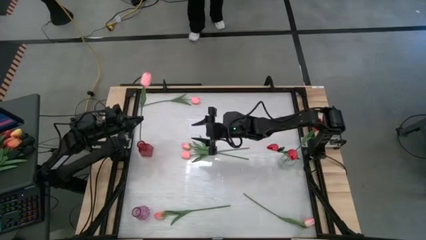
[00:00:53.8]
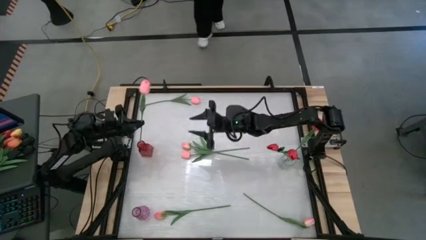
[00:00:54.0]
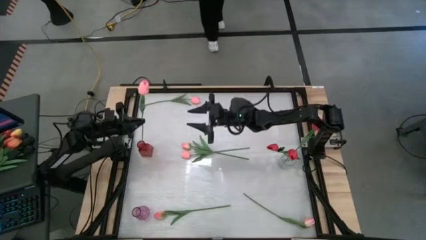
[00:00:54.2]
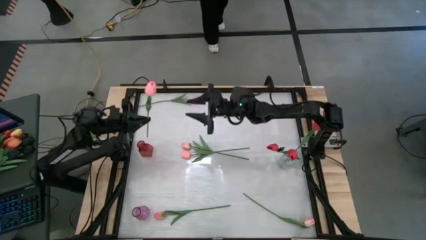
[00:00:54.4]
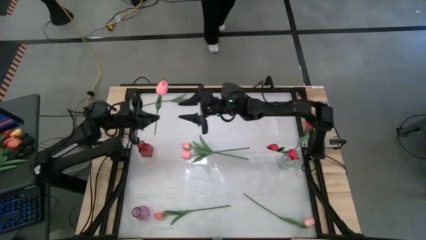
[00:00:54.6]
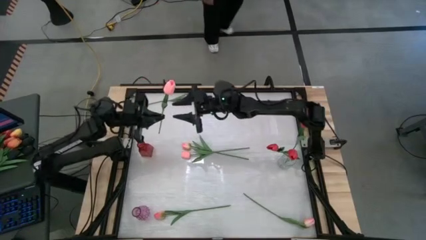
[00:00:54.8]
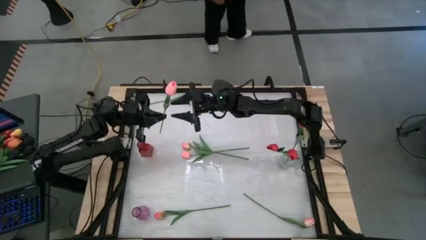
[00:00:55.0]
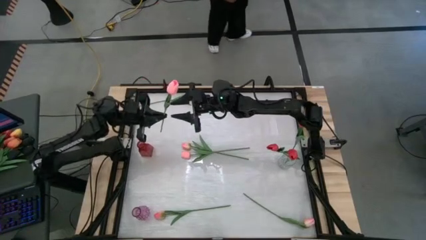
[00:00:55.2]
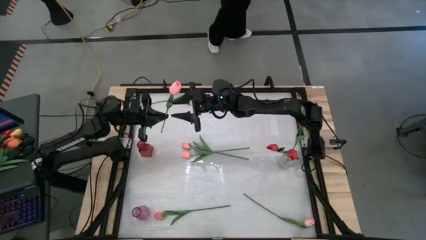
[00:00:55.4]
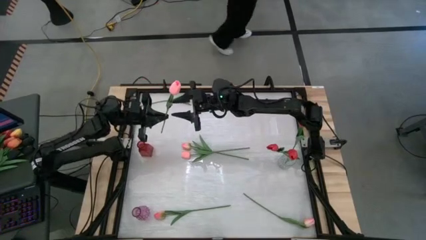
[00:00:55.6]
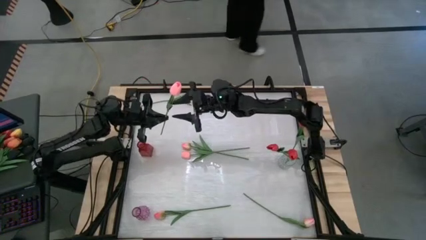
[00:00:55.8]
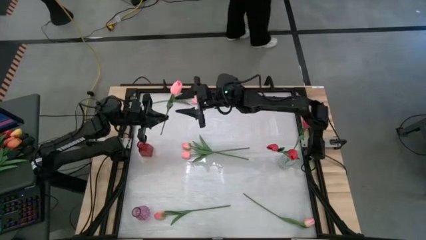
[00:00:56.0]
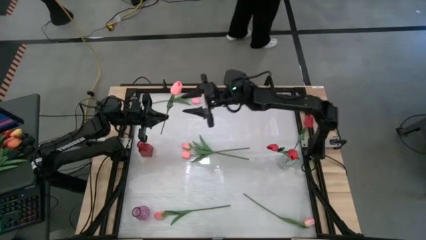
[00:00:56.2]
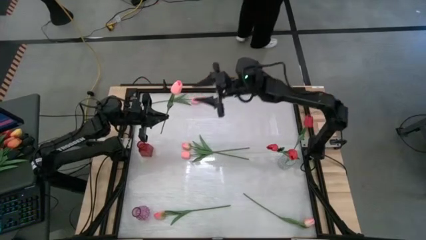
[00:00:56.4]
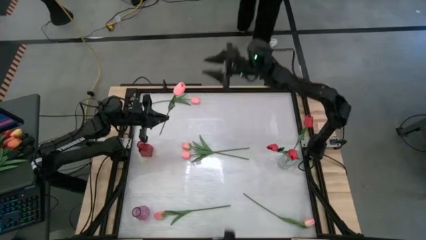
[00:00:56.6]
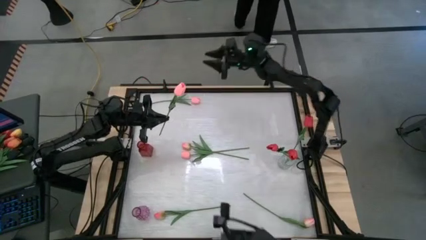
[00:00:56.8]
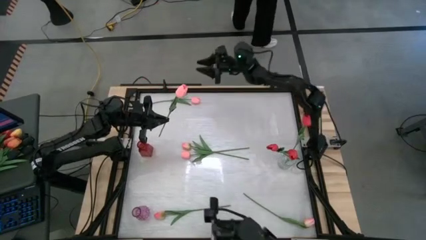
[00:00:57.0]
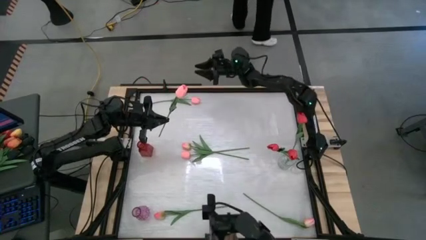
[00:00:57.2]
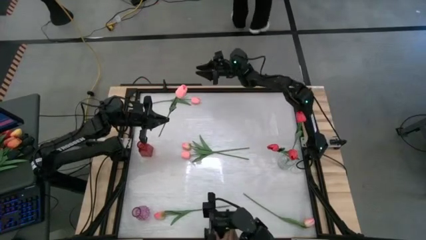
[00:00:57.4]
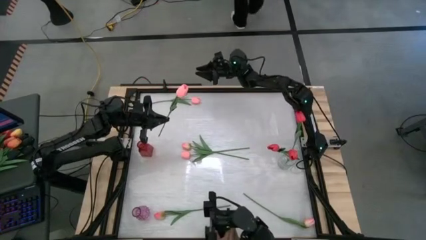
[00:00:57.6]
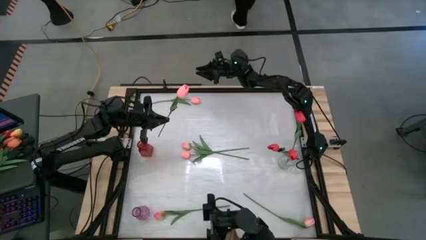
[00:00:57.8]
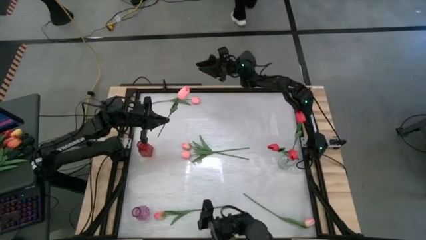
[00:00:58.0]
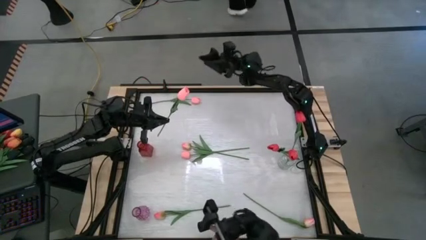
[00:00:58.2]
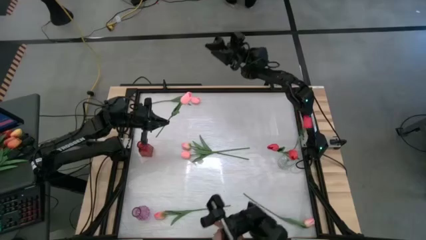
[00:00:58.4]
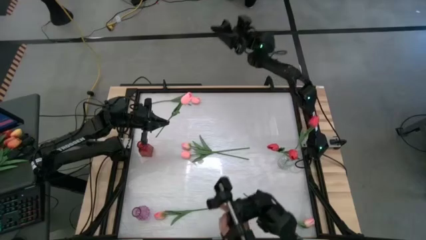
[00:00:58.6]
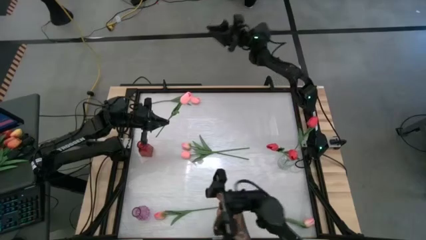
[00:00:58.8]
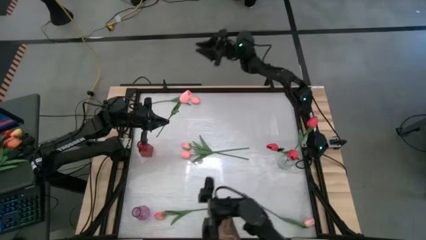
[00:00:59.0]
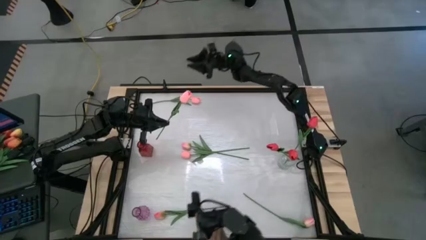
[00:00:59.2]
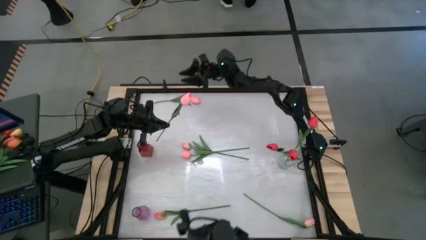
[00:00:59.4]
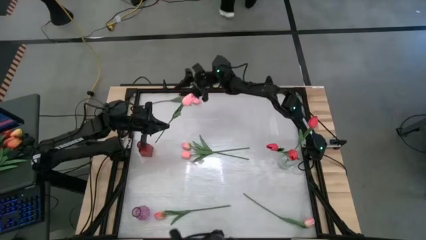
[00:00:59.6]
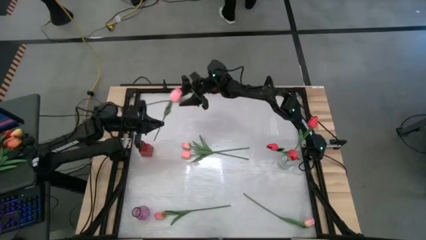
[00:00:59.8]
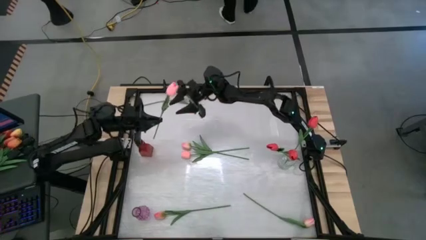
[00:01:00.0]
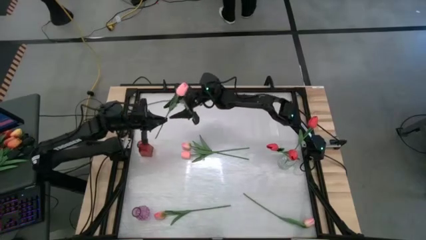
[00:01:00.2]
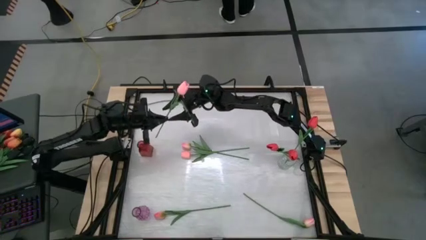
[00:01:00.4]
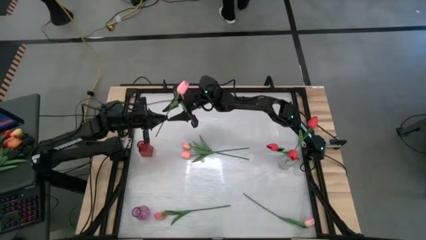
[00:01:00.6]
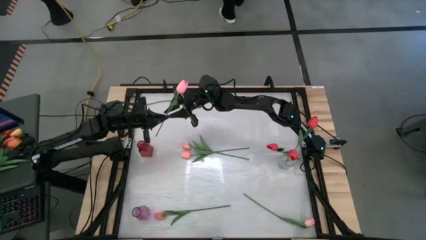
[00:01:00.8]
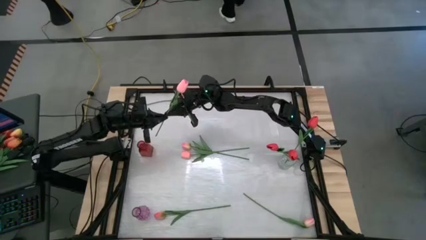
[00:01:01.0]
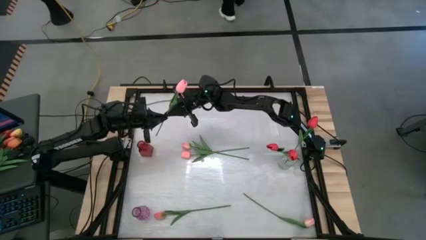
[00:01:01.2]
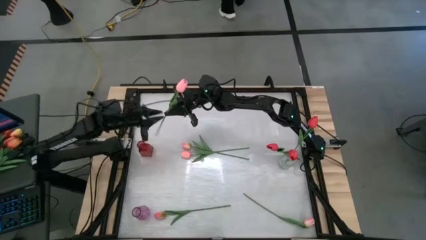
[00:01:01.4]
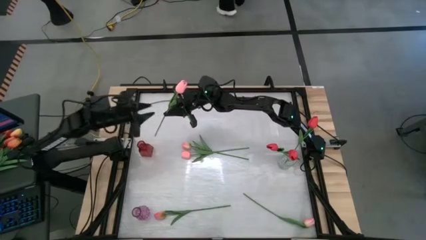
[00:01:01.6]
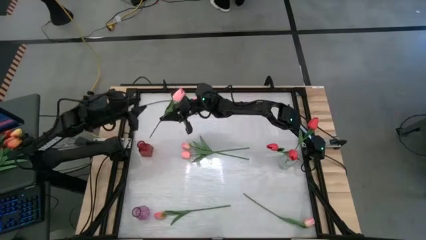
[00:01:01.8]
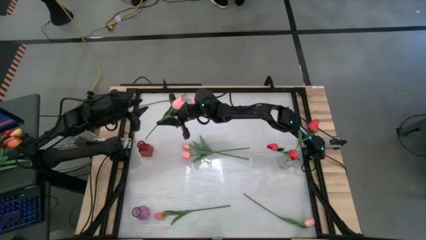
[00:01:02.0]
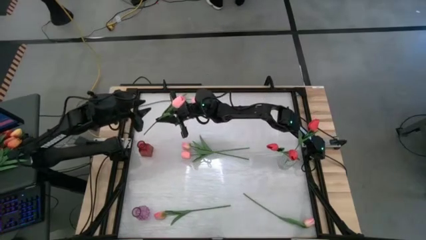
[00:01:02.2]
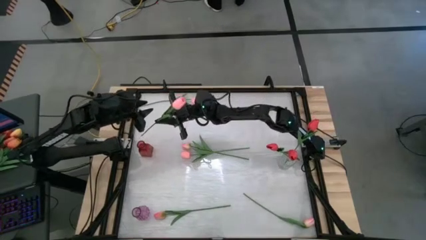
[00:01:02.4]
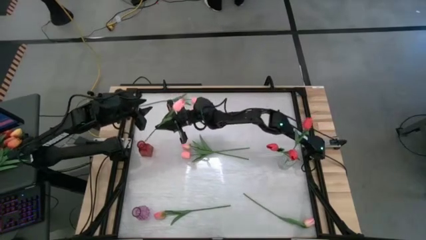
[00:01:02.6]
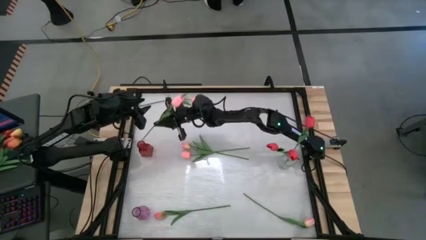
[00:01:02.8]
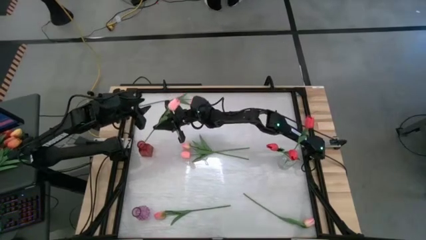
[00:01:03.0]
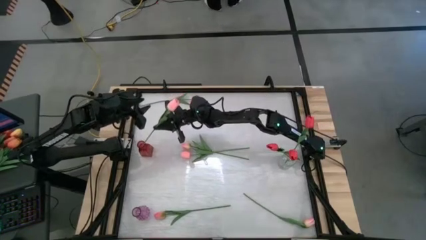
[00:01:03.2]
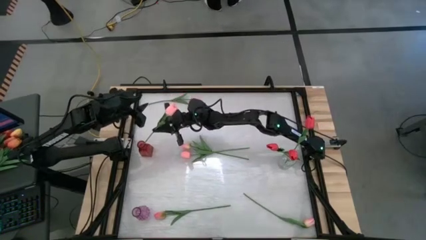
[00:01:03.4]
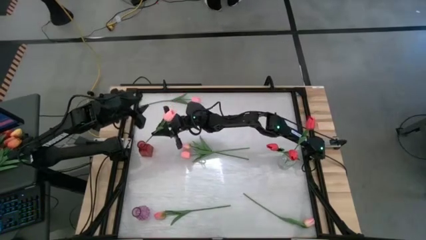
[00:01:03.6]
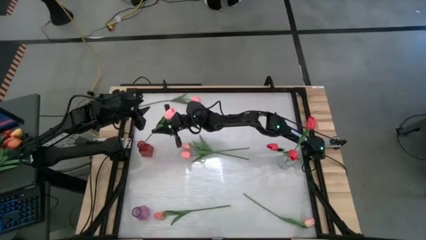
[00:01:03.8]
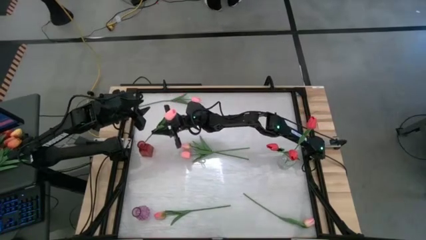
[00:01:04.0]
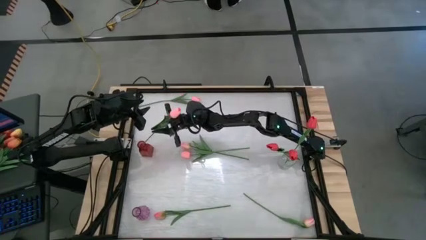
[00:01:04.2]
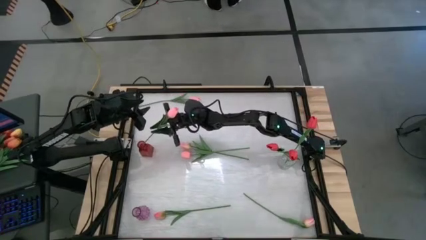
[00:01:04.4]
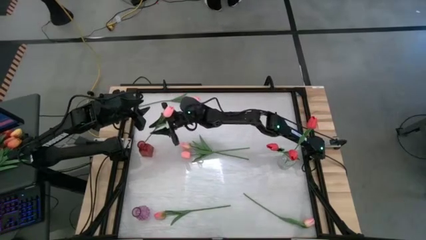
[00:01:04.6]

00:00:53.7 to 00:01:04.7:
Task: Sort flowers into vase by color
Put the top right pink flower into the red flower vase
